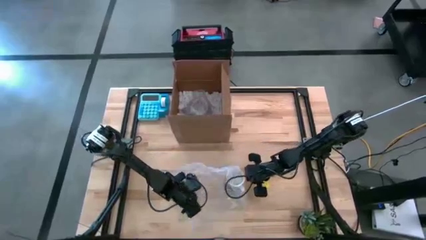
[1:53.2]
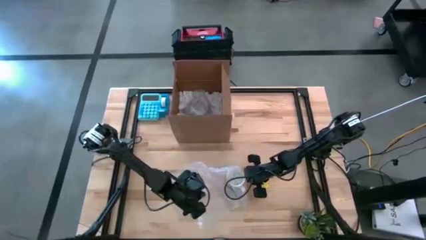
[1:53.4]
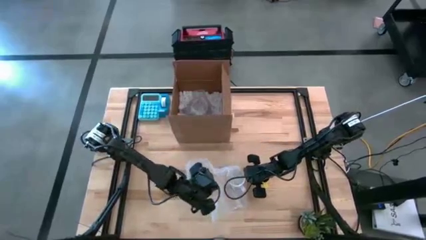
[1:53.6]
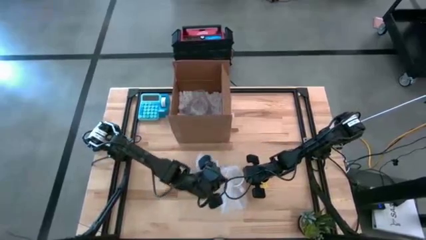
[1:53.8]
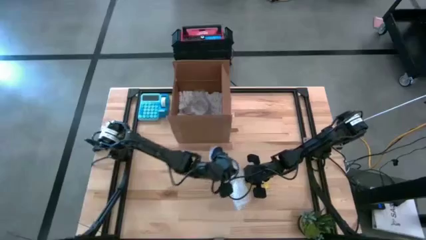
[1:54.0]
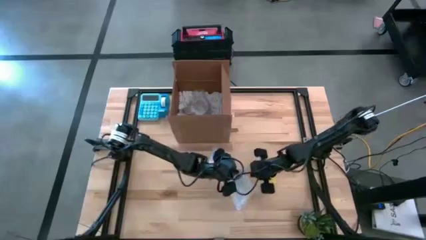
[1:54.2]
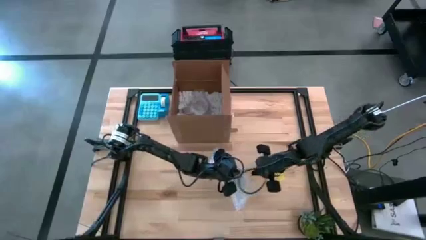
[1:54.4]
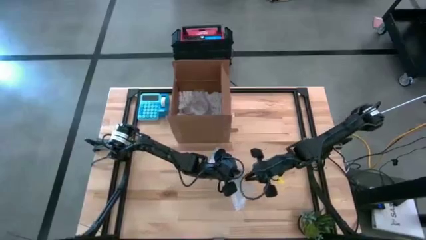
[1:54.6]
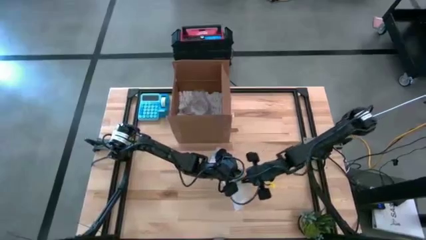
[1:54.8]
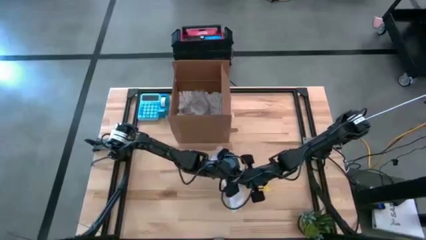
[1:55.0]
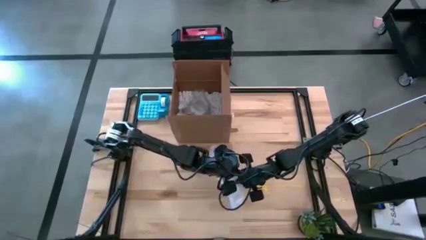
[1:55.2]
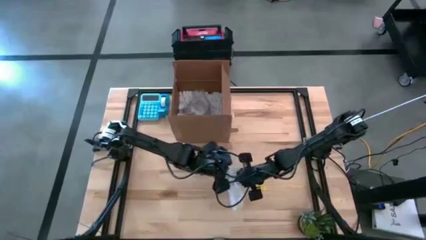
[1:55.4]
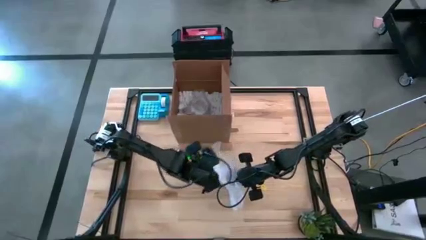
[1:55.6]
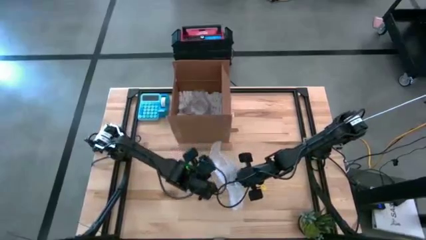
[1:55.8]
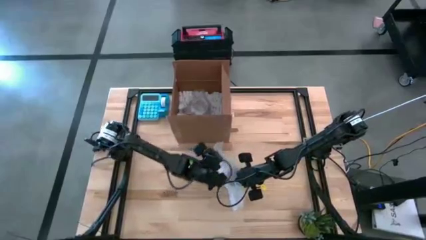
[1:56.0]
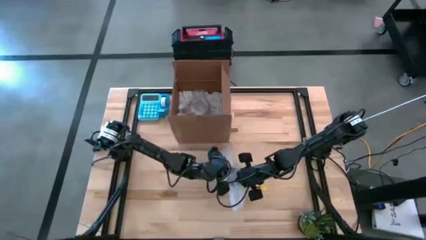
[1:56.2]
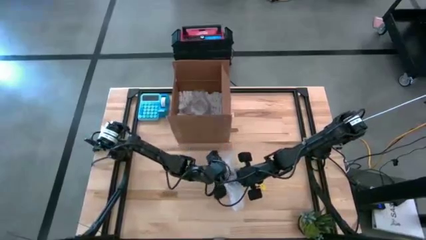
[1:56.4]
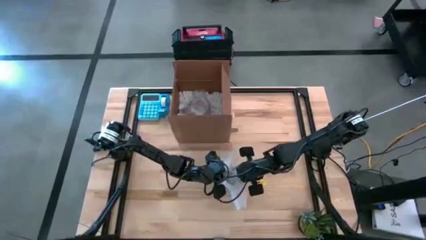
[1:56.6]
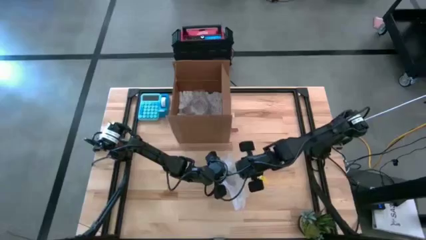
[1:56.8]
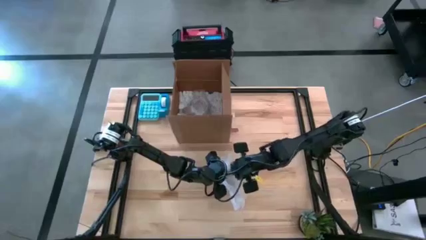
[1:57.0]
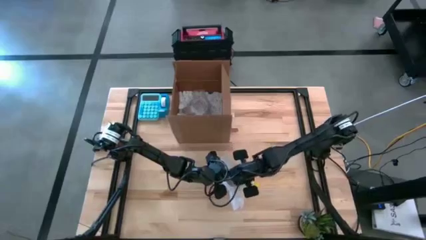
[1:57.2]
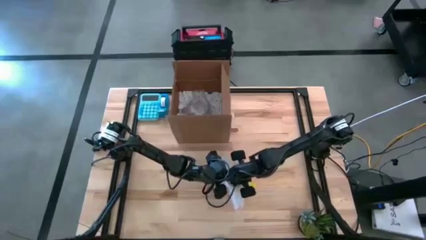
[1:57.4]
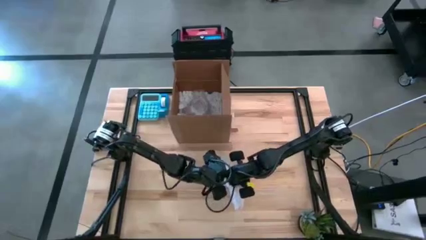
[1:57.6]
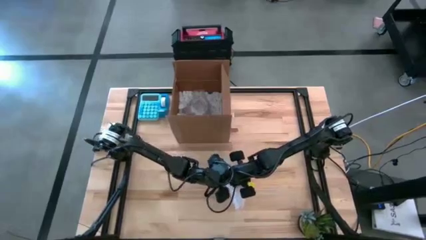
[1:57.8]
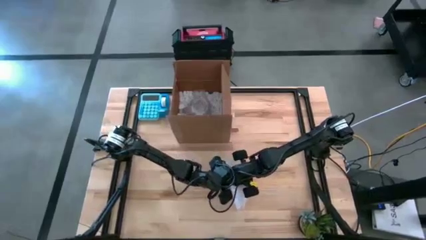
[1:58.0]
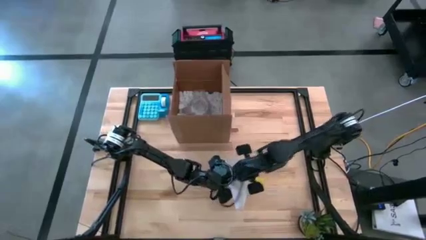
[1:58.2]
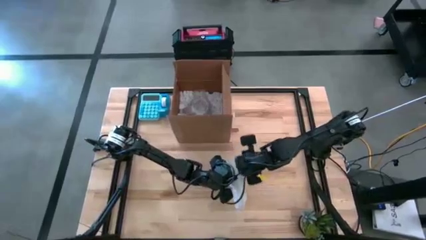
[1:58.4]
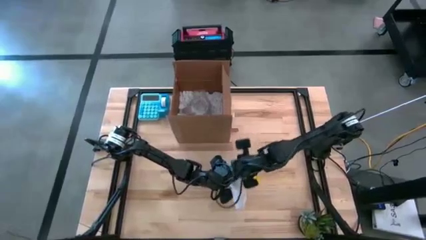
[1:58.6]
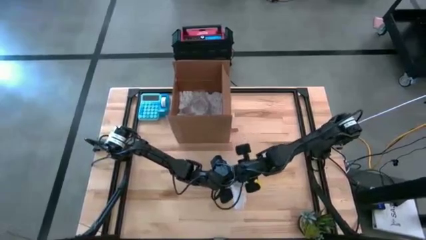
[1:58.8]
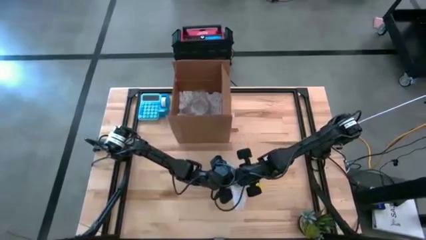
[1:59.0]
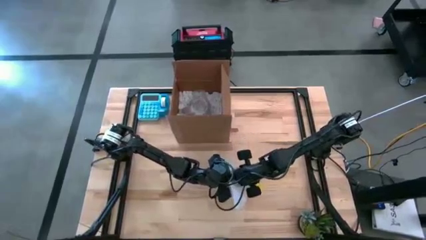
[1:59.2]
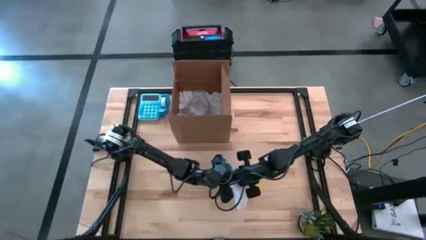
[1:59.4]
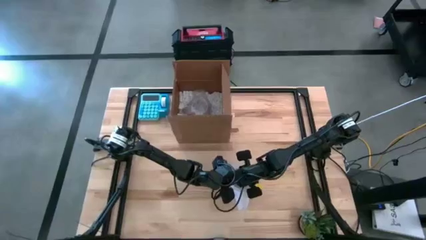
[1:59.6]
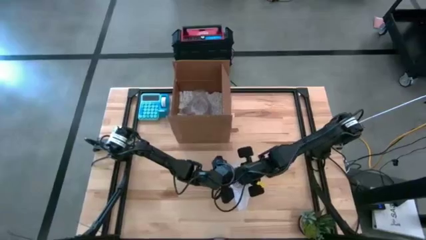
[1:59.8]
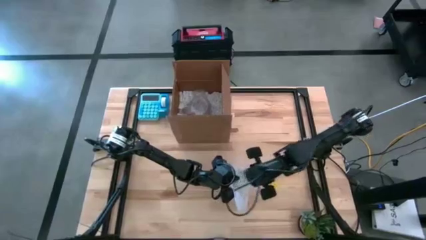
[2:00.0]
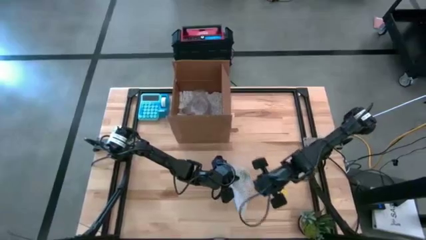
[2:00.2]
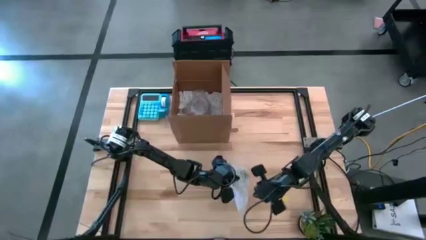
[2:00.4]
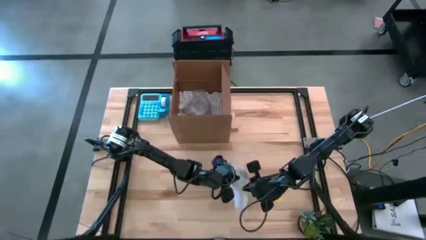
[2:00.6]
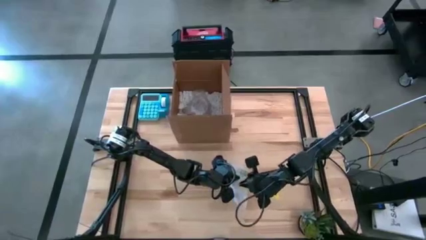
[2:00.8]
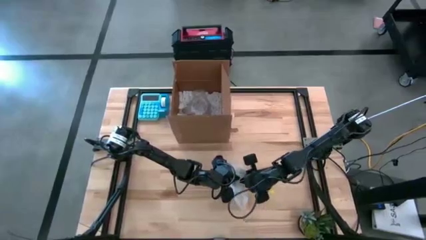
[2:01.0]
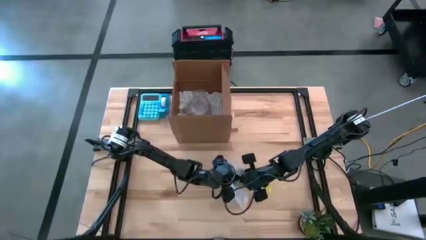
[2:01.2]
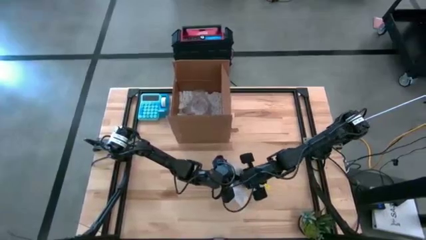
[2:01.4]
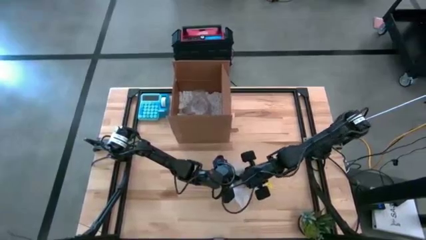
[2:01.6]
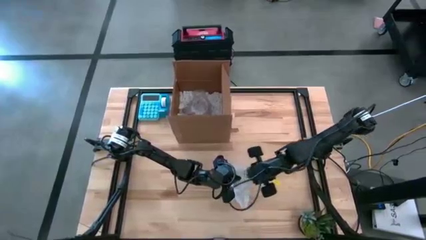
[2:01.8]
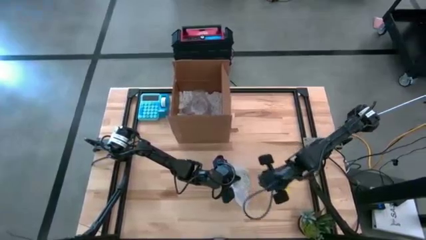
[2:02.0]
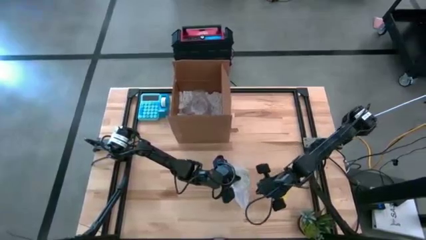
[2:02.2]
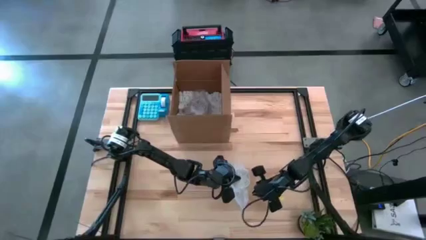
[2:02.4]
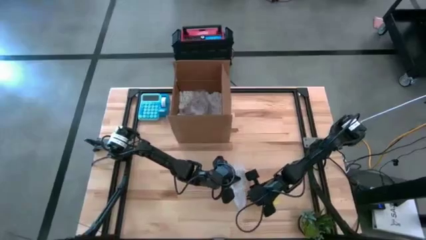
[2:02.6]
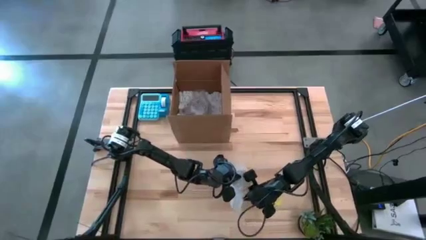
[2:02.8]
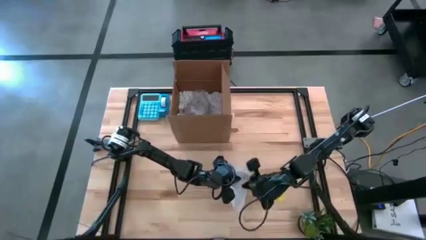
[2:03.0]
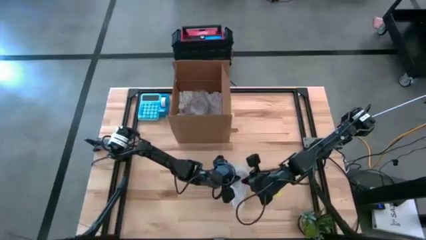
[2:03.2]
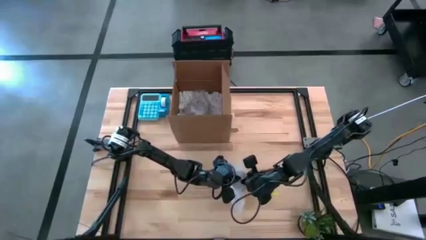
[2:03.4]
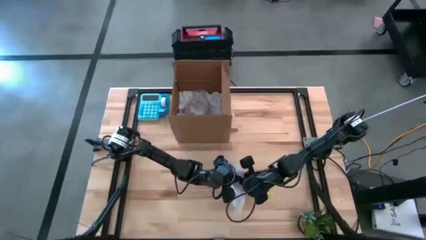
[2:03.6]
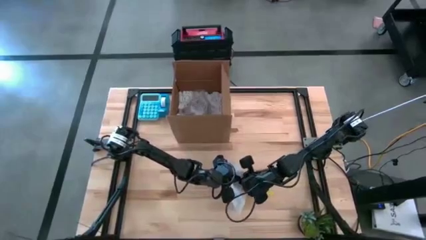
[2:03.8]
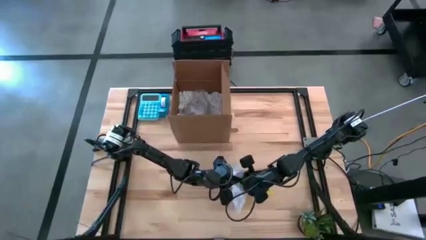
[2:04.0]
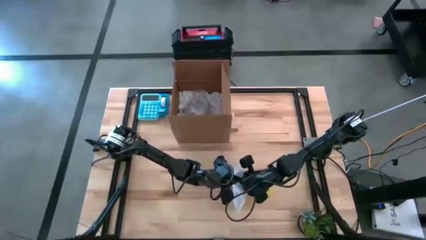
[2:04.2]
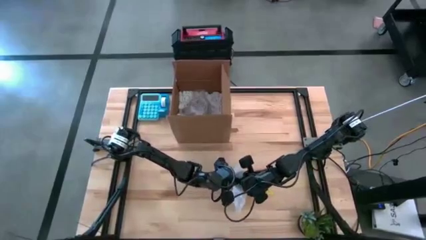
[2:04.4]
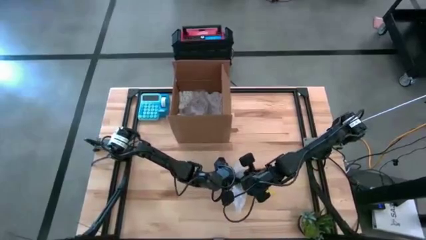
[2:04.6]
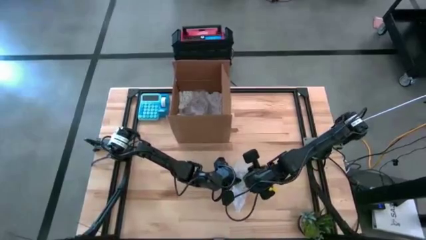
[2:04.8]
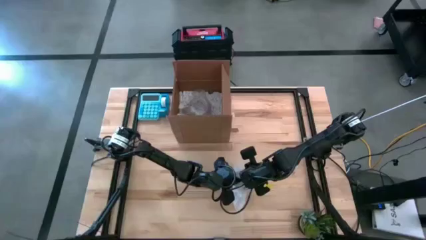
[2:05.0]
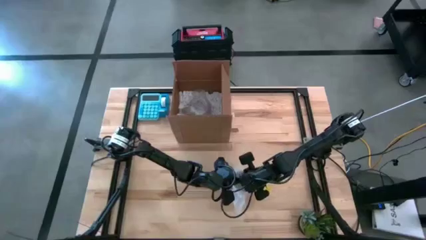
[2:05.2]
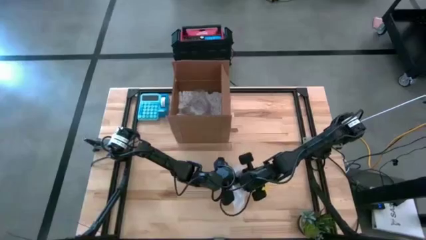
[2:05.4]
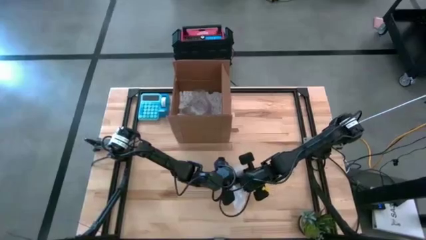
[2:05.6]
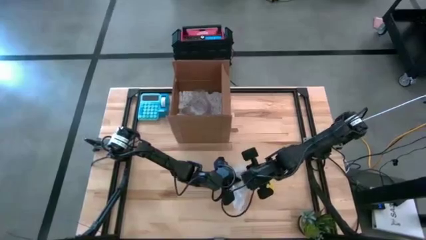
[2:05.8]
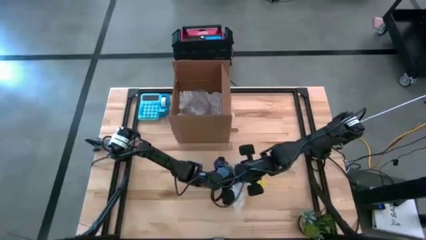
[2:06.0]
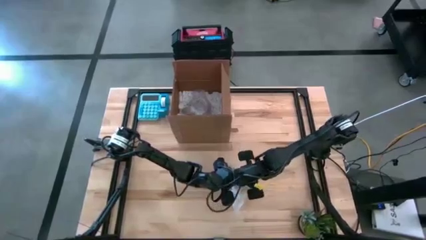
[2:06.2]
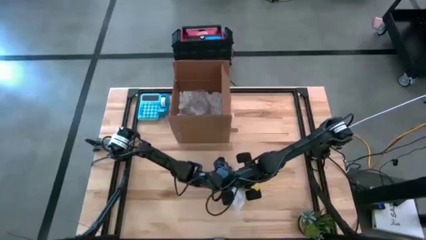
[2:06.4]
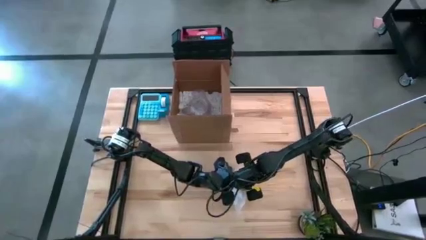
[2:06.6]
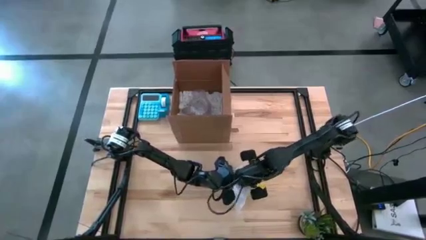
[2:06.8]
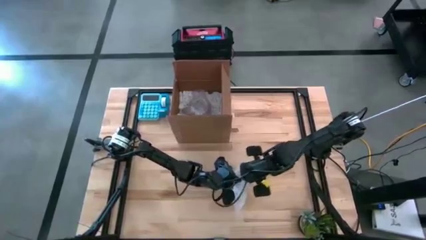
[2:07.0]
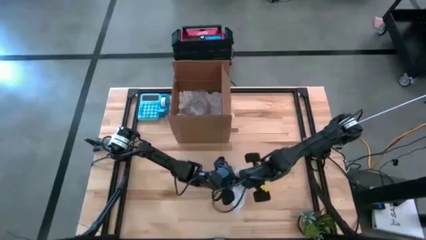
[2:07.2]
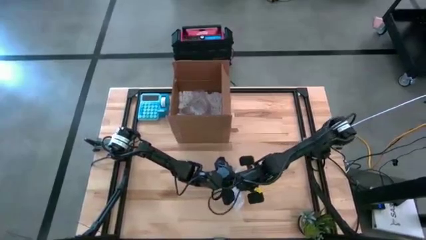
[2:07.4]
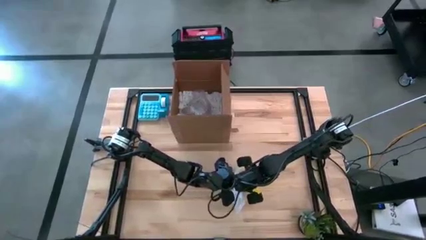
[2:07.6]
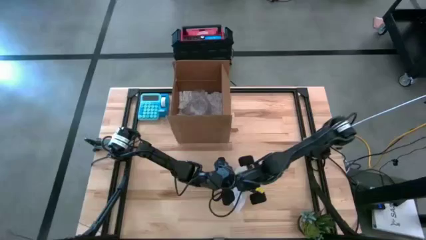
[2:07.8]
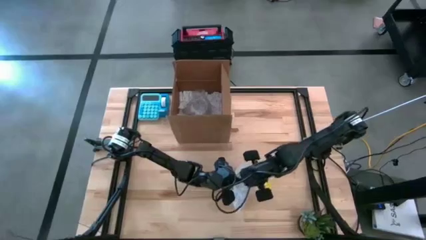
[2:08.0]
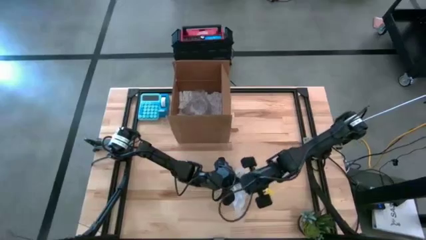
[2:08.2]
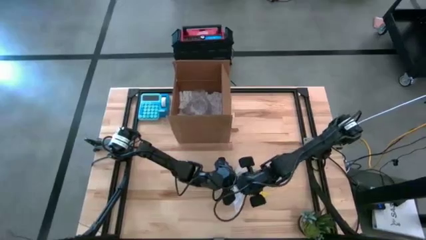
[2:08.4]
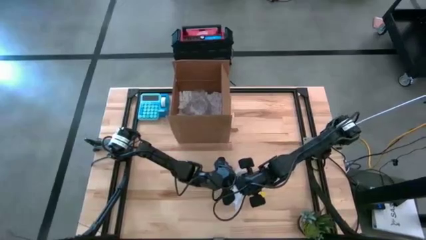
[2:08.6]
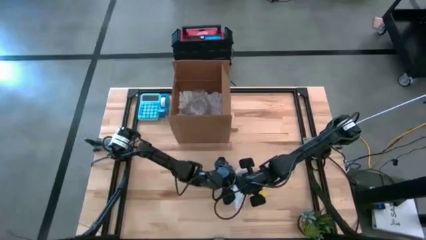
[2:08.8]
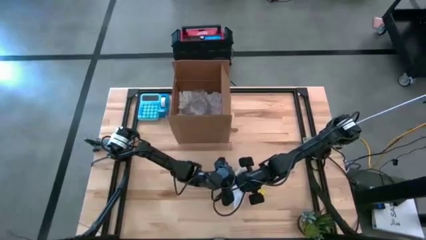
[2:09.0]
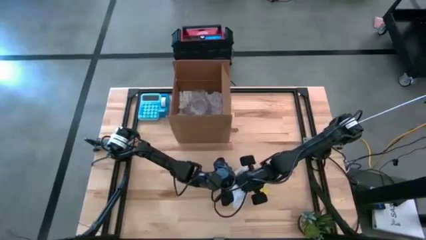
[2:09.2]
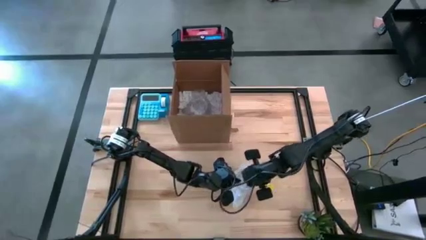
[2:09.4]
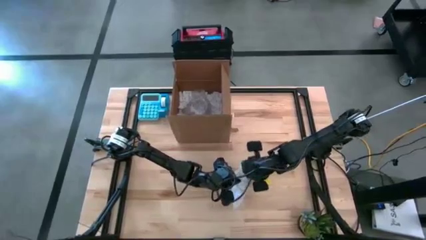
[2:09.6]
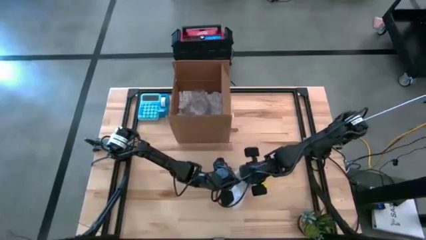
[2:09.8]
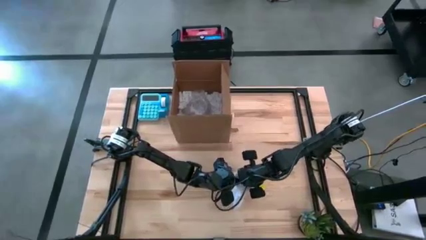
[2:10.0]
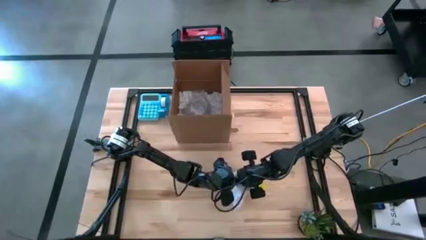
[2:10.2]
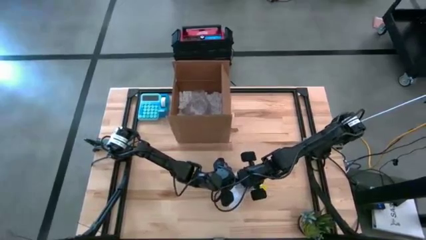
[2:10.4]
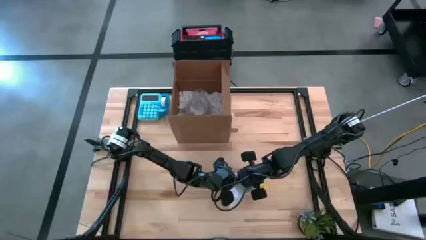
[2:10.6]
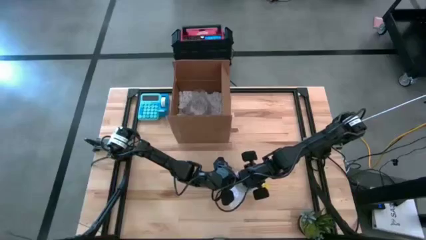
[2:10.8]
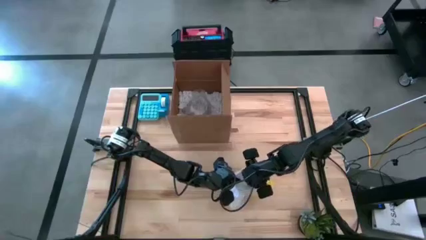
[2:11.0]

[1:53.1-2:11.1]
Task: wrap mug
Wrap the white mug using the bubble wrap
